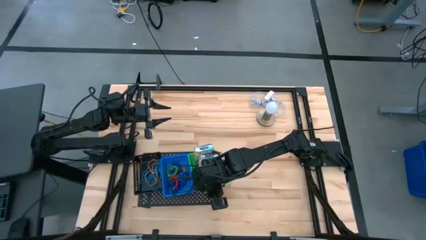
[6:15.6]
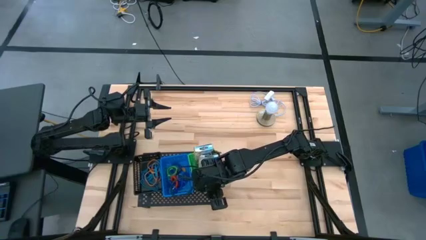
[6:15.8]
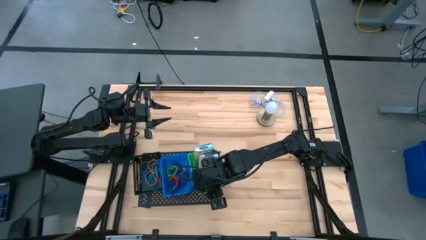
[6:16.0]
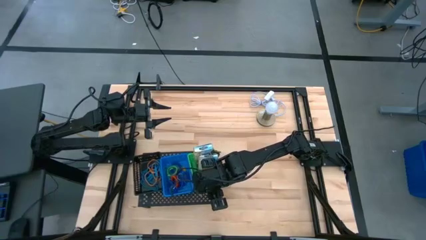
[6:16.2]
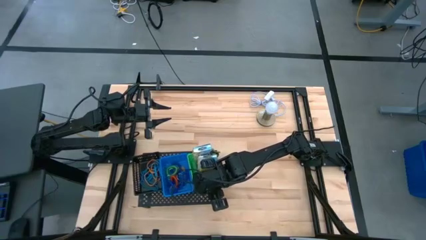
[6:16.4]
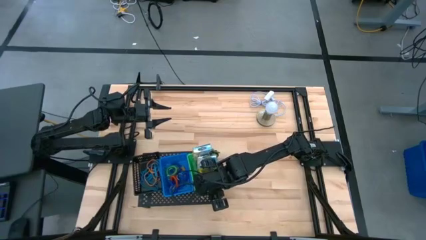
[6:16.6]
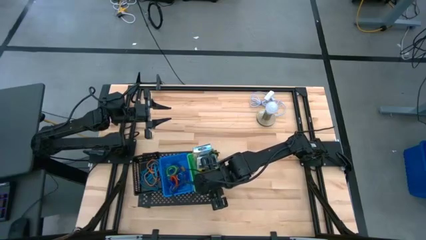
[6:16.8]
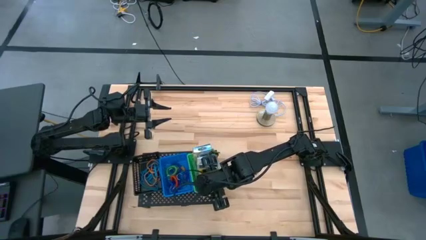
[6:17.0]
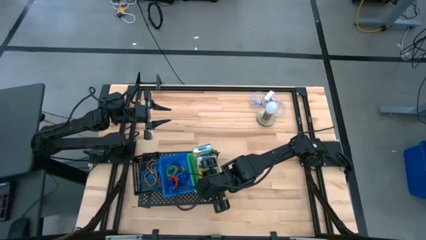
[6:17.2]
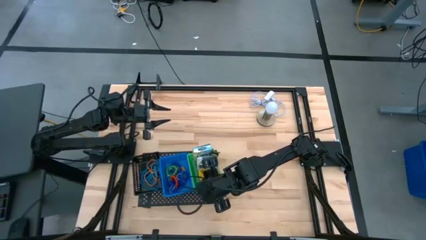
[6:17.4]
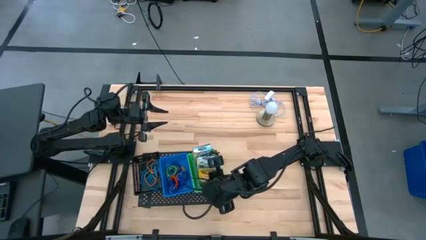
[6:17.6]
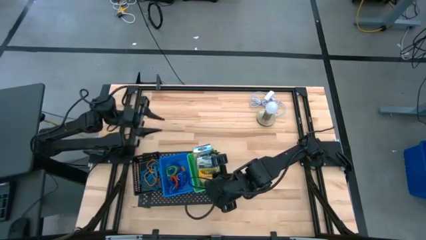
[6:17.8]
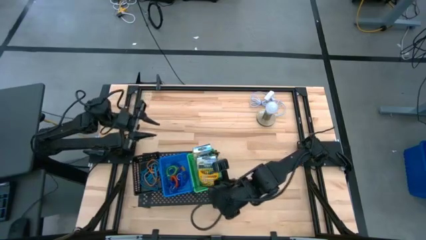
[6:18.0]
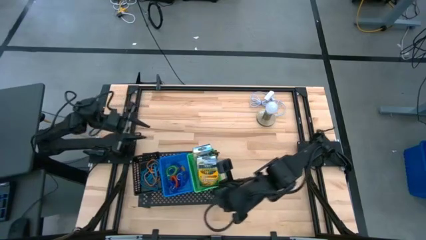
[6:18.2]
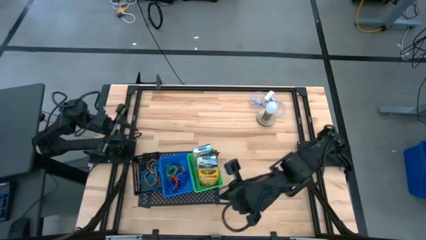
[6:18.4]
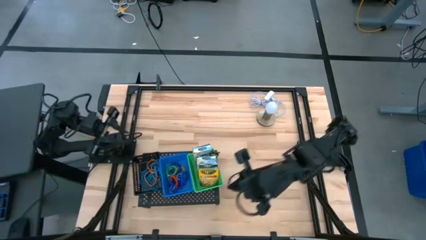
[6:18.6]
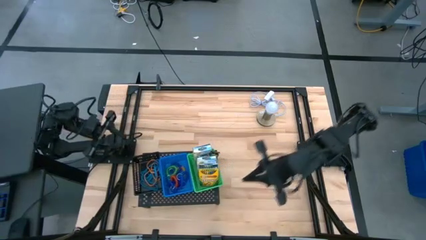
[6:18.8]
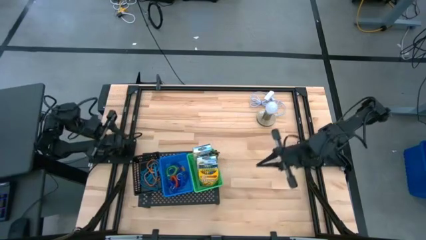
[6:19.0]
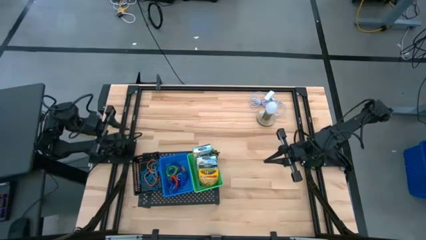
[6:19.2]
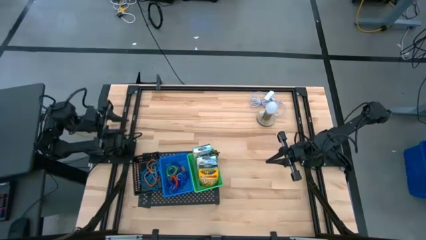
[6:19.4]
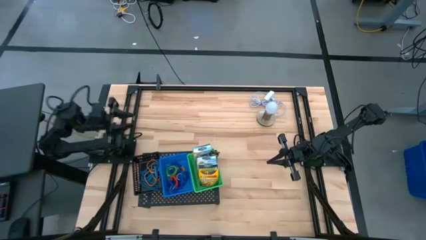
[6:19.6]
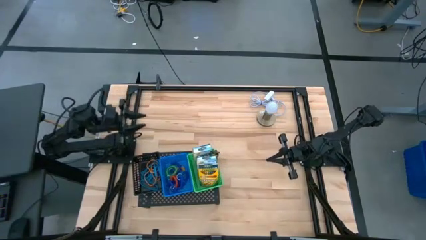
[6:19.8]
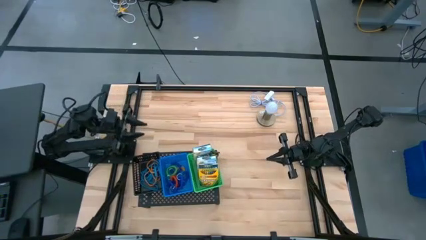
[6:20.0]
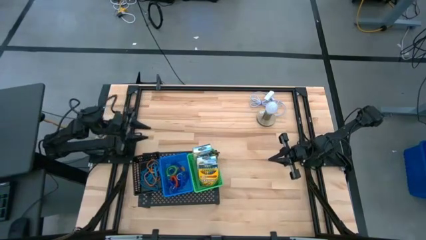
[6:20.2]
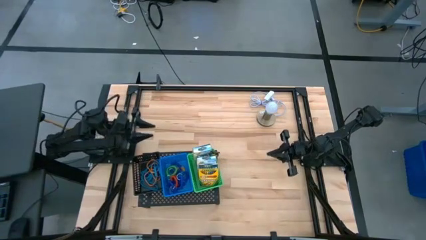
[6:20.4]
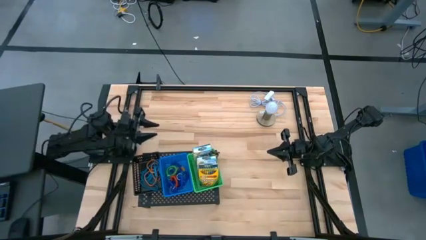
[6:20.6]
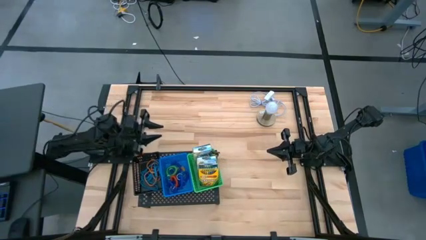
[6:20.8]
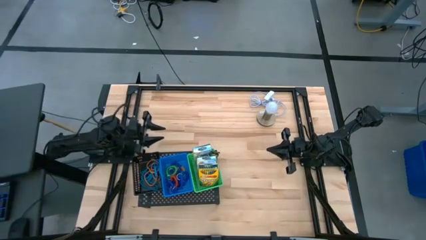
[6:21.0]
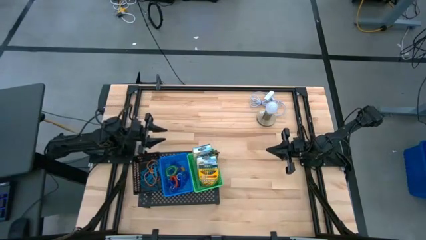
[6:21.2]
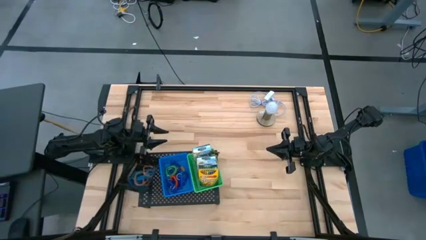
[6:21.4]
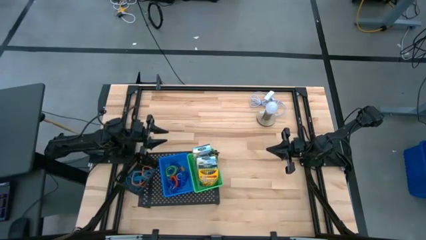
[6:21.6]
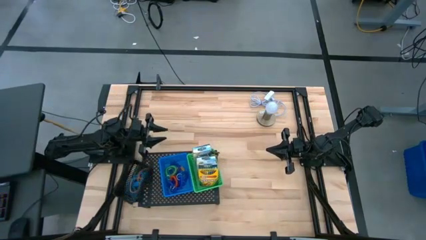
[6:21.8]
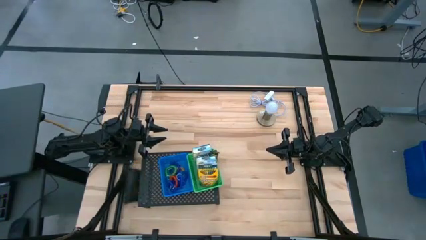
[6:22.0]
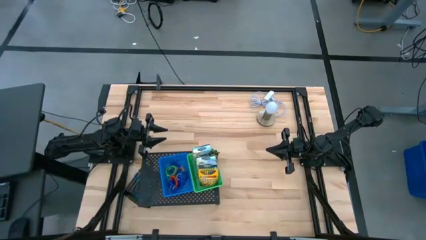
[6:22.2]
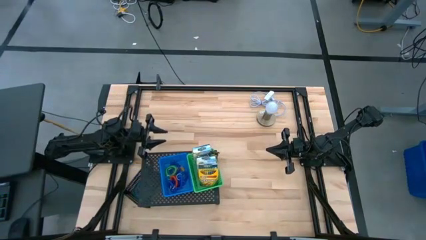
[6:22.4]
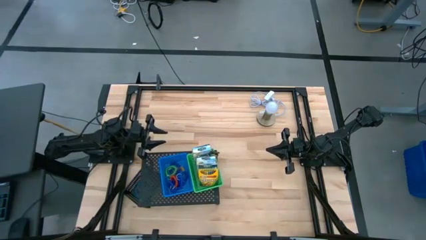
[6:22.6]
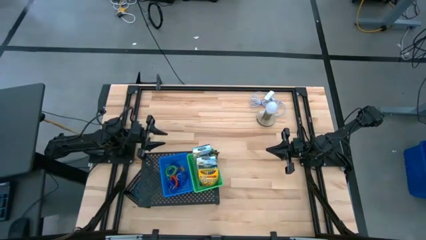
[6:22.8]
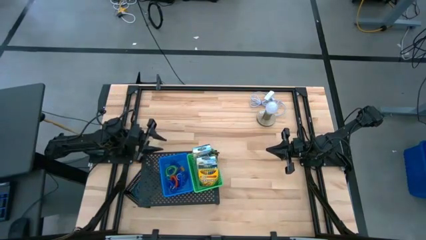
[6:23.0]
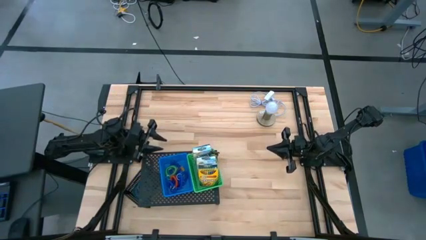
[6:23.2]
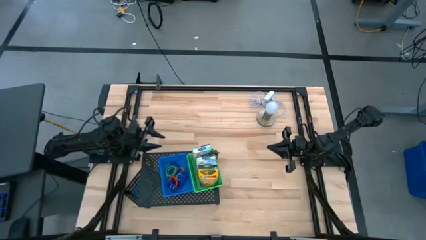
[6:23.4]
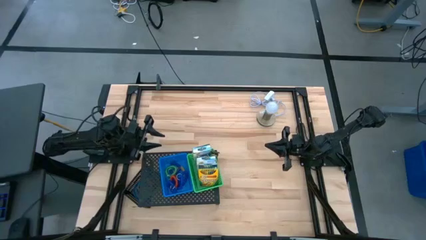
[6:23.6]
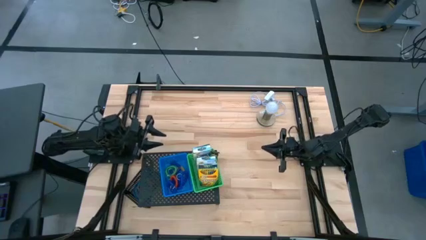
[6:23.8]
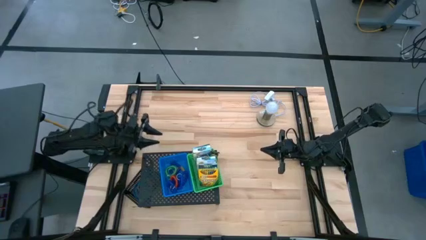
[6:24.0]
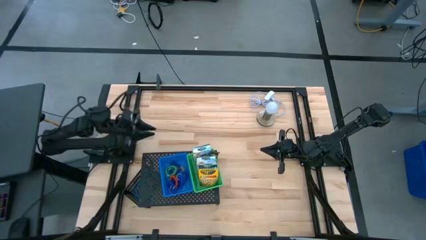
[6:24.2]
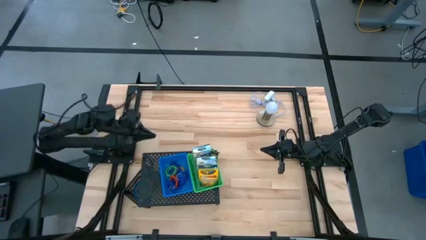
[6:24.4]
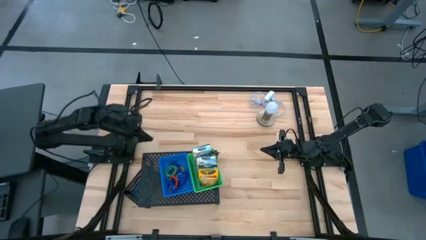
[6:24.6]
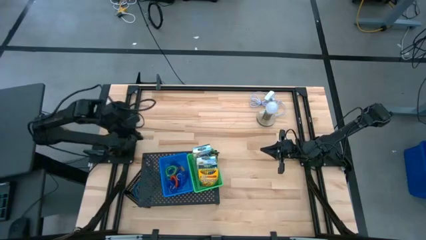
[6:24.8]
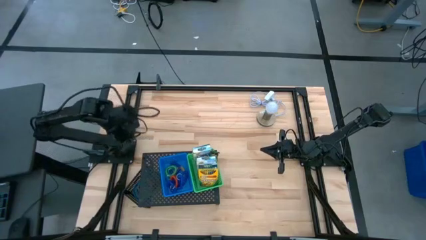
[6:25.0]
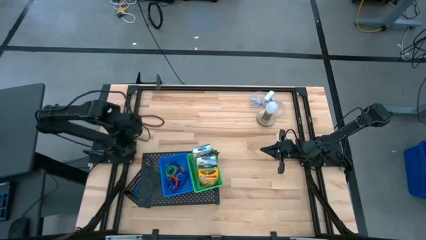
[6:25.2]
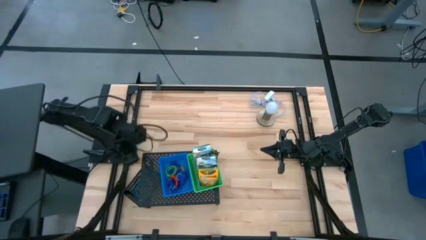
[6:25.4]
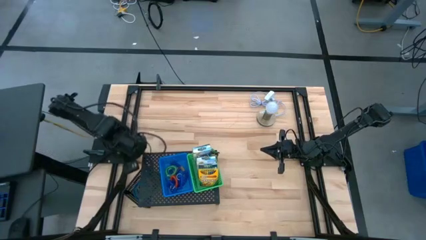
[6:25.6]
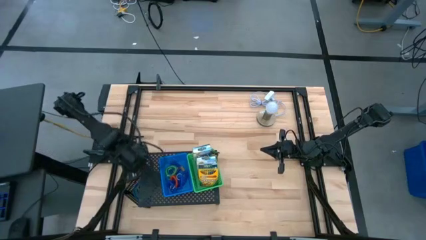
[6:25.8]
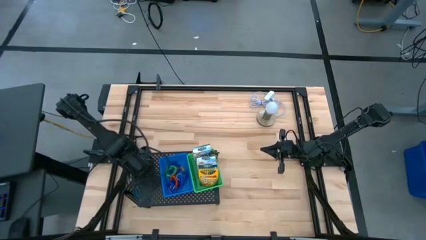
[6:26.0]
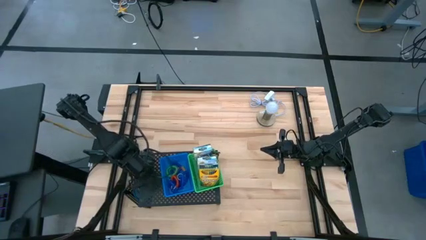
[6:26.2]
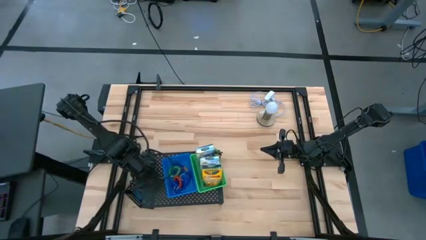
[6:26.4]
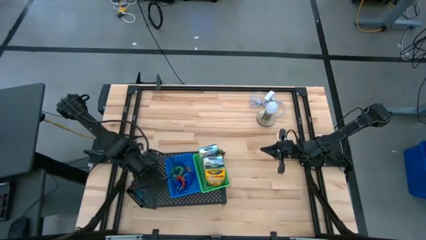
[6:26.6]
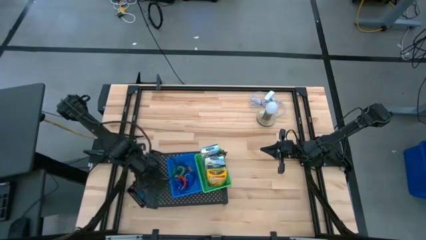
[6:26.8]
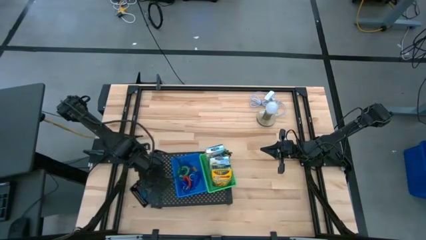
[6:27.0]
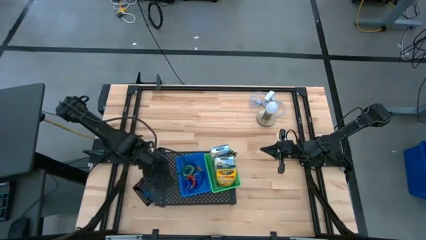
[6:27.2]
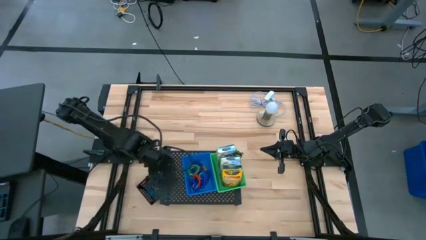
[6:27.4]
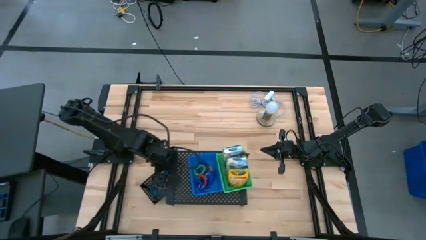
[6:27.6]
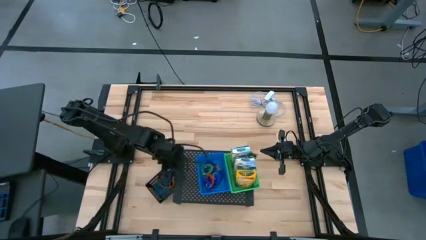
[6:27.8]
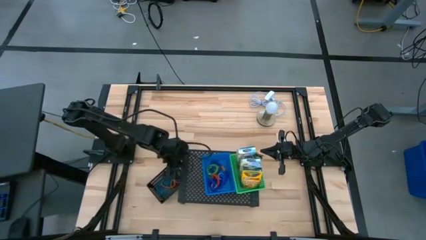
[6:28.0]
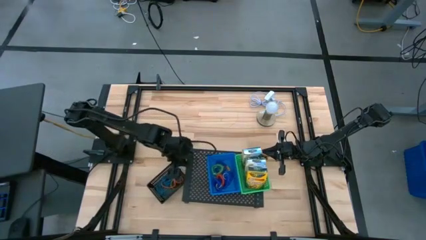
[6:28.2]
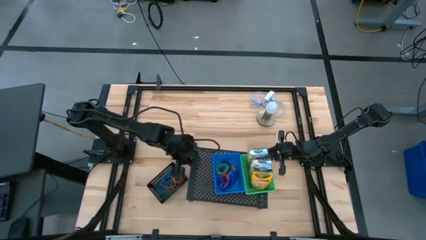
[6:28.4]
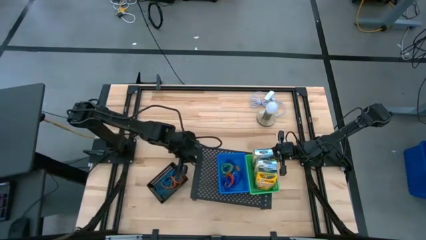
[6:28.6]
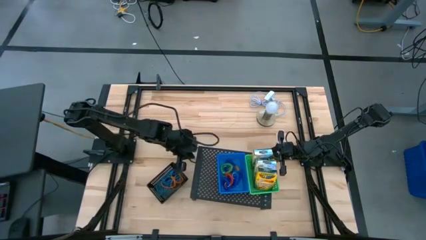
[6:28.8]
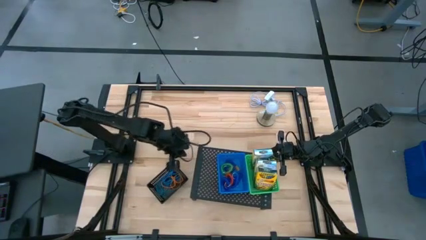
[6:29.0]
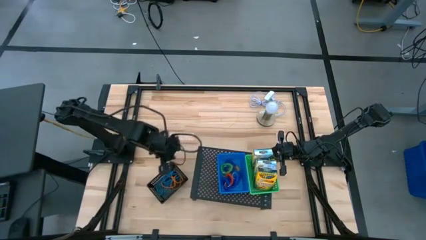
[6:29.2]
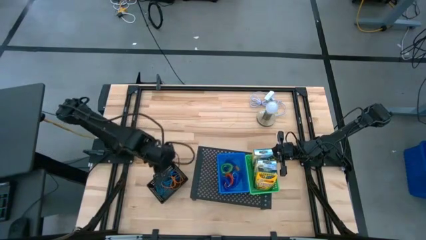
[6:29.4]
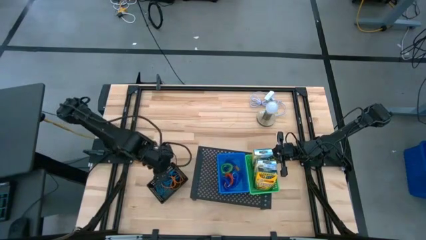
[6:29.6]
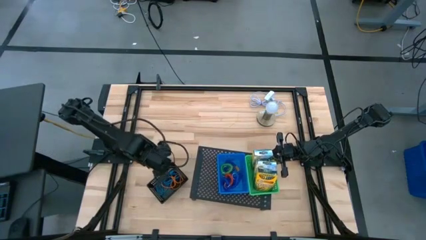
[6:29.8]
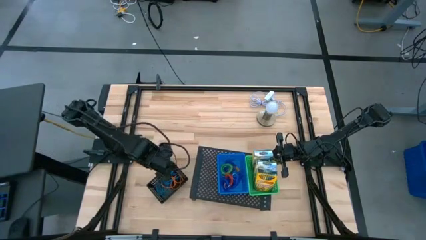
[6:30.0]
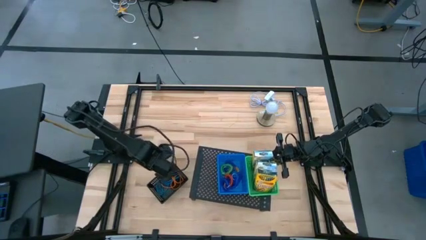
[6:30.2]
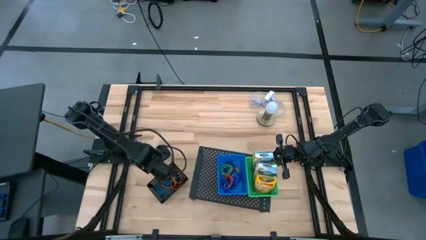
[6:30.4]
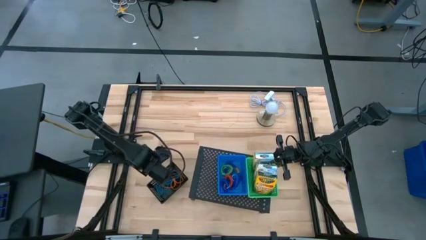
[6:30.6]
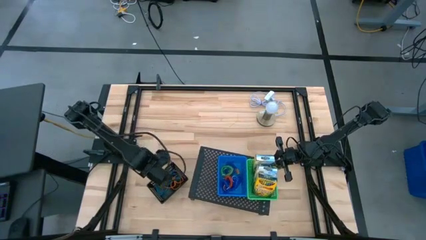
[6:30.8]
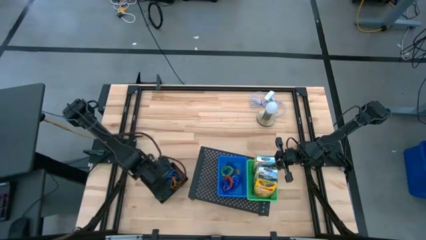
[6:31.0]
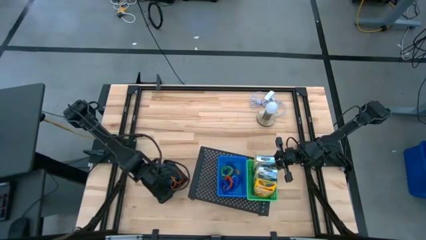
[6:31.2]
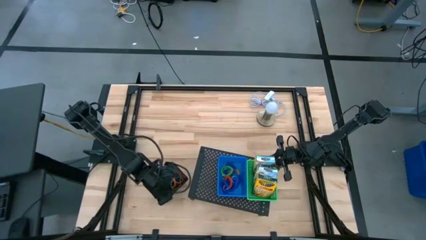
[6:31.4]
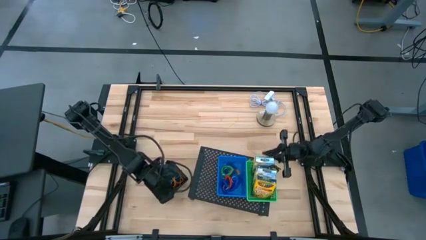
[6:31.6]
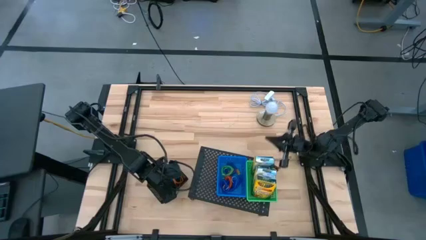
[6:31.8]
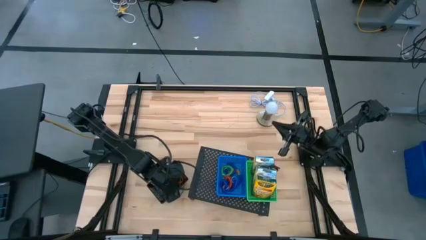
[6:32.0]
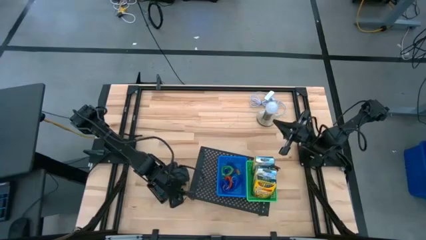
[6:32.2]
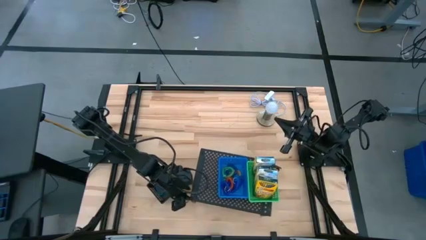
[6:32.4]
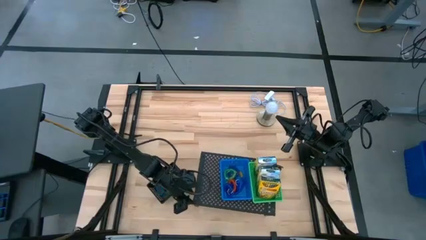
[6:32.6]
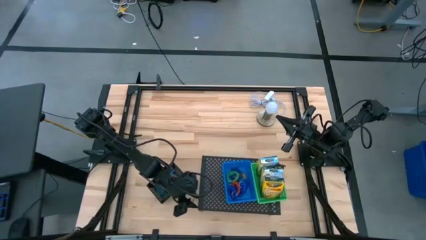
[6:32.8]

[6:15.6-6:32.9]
Task: Pick & Place Office Desk Supplies
Put the black bin with the rubber bands on the shelf
